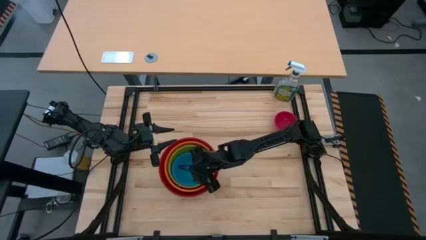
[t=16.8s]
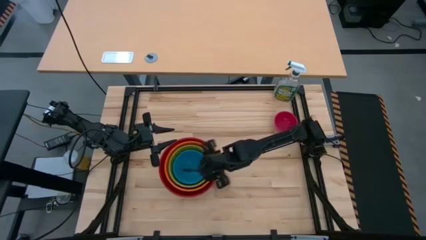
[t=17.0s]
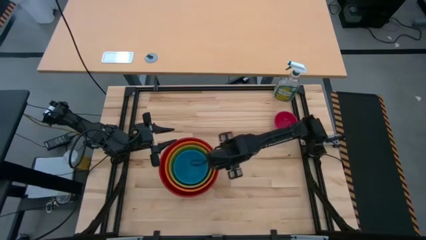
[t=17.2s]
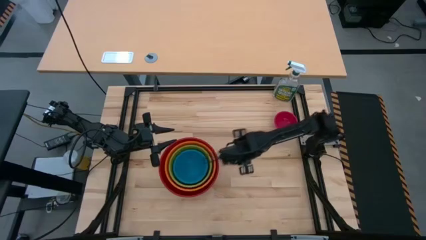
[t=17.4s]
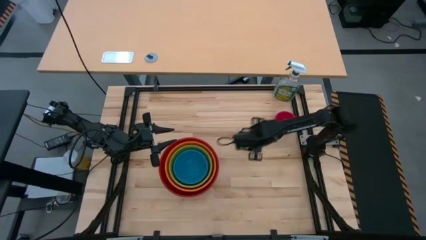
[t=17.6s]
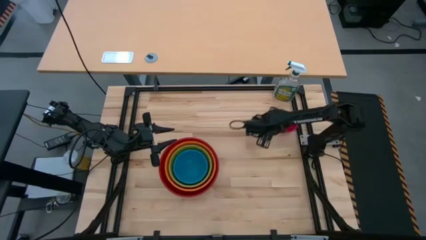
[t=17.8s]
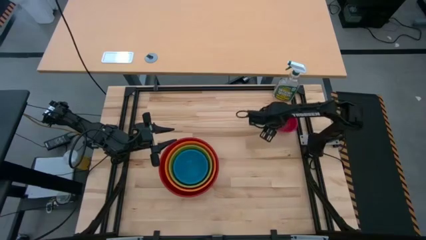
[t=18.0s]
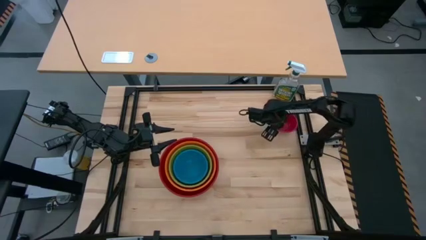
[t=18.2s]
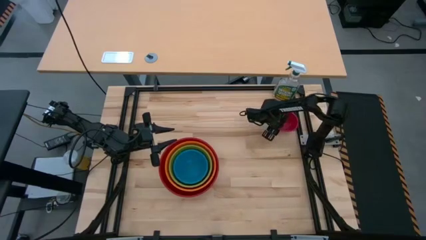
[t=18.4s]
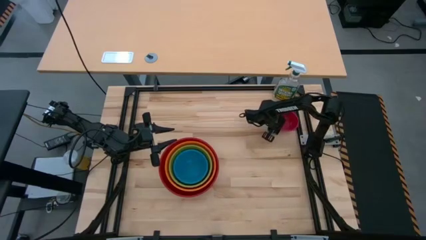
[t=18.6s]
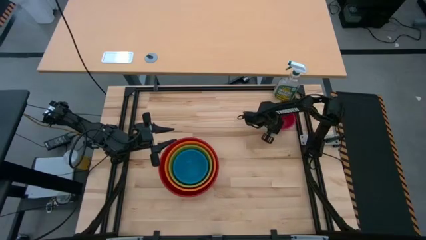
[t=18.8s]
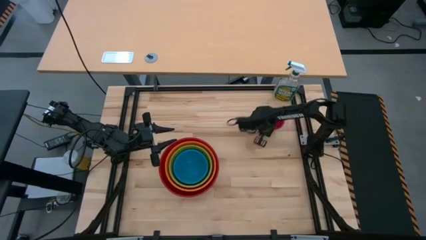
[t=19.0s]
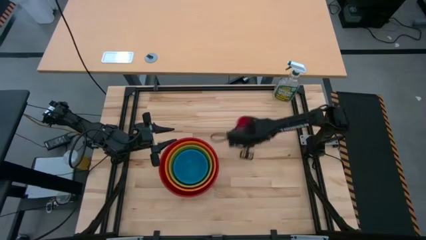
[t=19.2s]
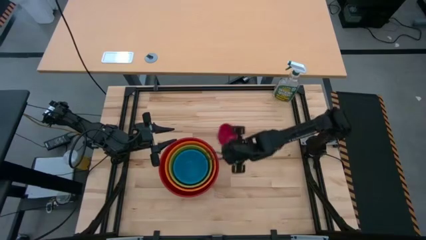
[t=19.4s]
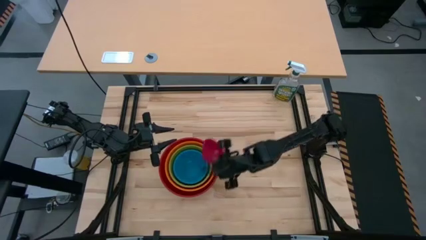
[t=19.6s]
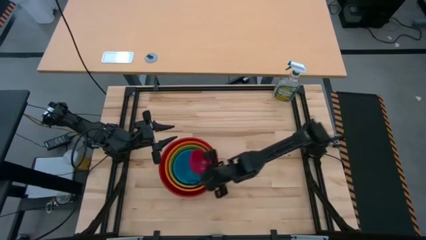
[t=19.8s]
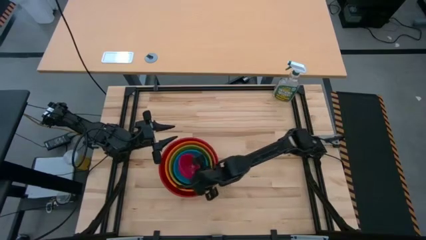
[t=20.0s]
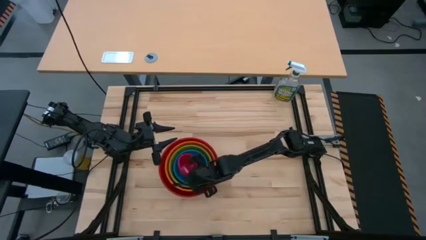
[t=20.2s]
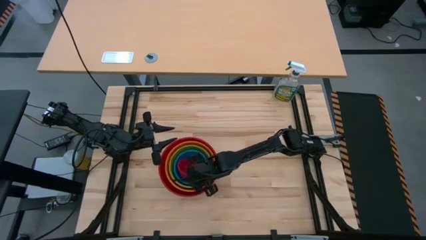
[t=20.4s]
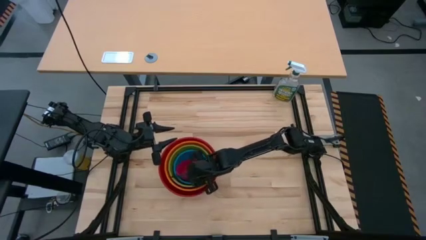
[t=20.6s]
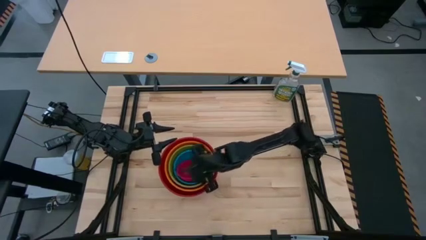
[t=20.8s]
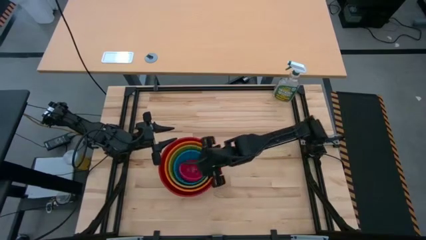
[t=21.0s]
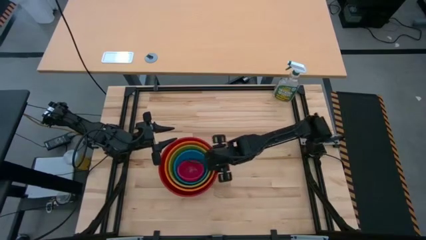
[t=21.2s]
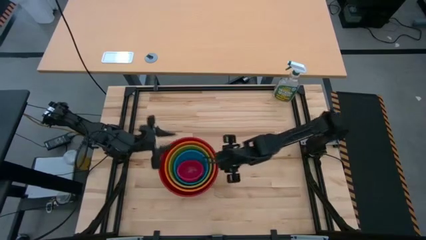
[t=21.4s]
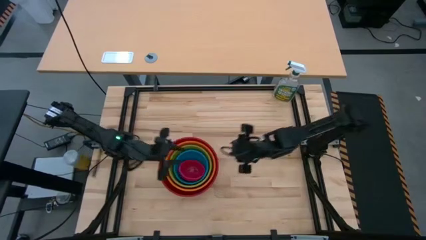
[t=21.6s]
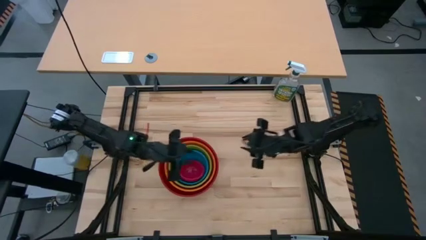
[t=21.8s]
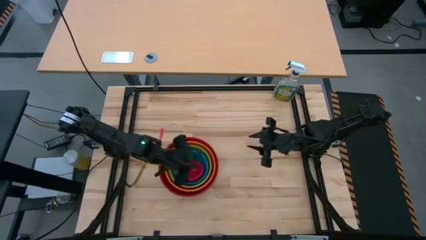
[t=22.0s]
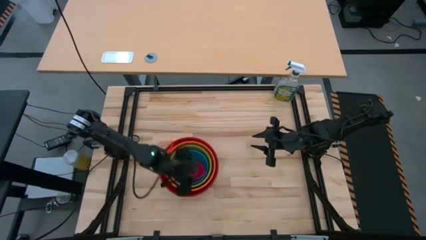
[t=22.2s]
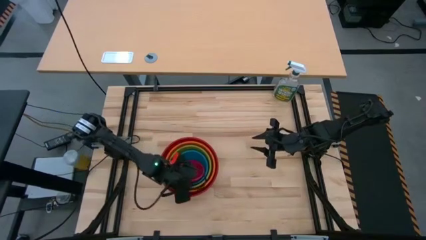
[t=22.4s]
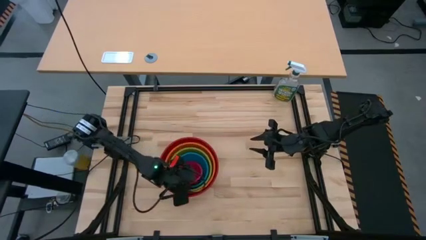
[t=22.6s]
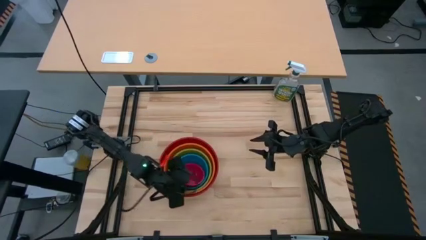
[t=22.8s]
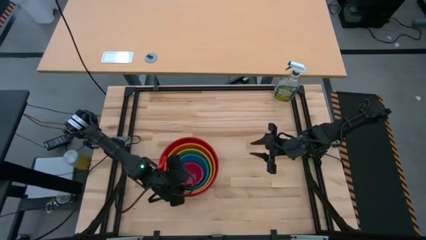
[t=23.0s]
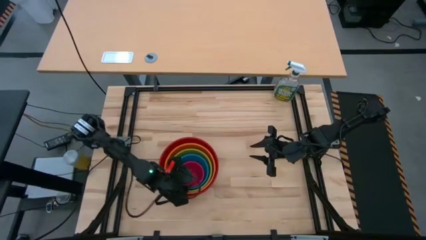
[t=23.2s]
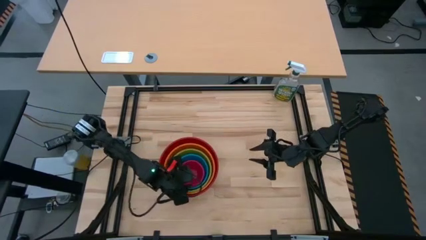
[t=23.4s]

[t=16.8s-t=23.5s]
Stack the small red bowl onto the blue bowl

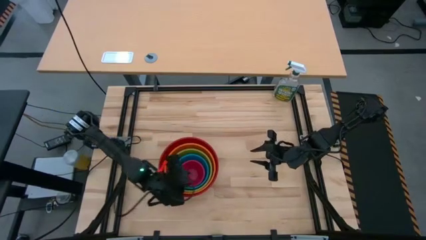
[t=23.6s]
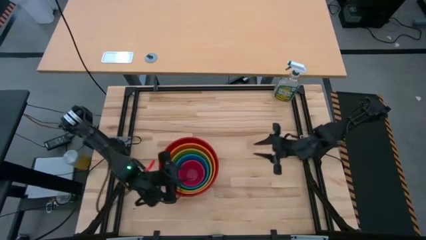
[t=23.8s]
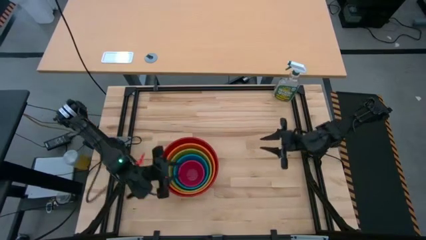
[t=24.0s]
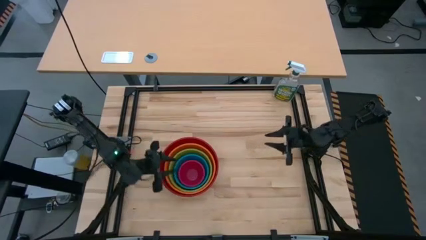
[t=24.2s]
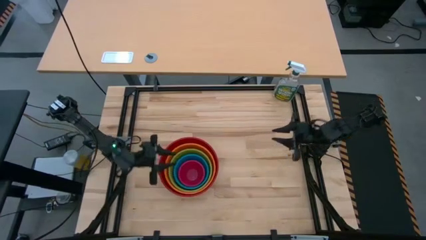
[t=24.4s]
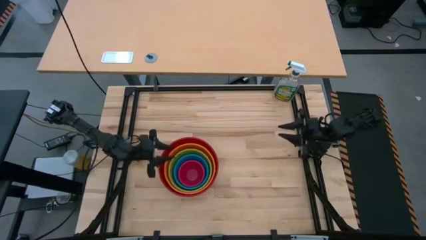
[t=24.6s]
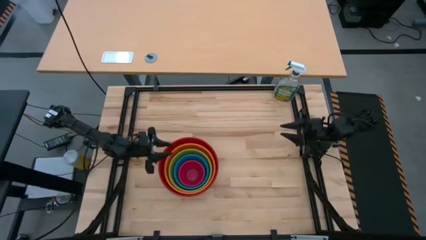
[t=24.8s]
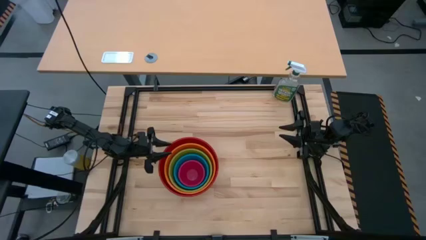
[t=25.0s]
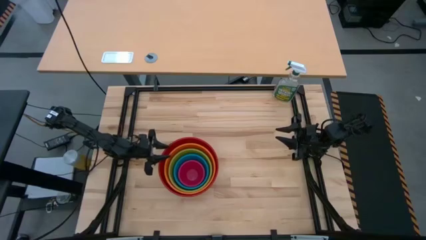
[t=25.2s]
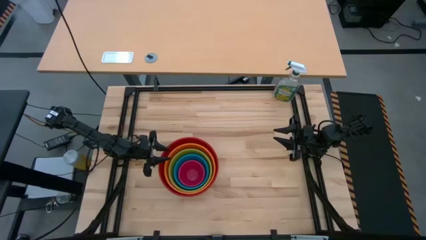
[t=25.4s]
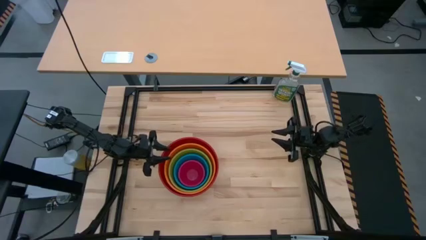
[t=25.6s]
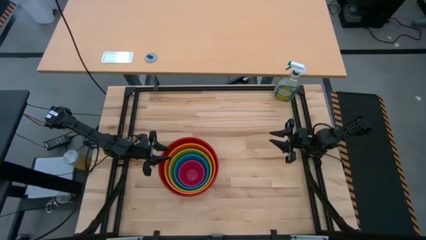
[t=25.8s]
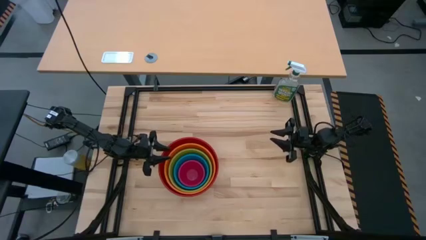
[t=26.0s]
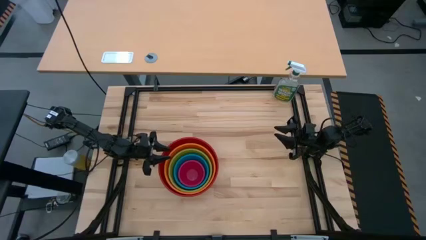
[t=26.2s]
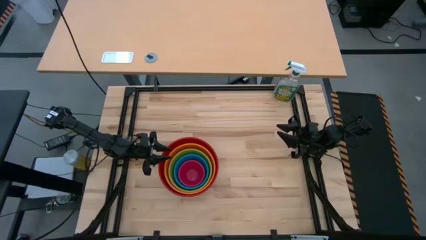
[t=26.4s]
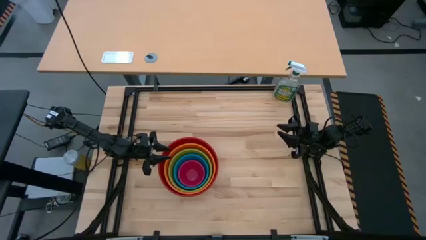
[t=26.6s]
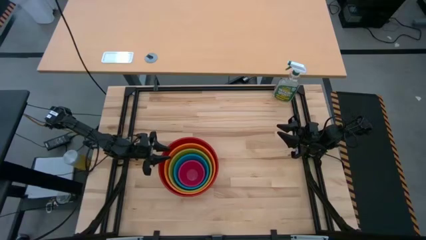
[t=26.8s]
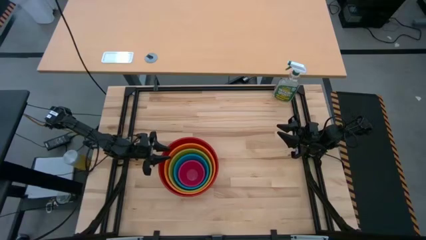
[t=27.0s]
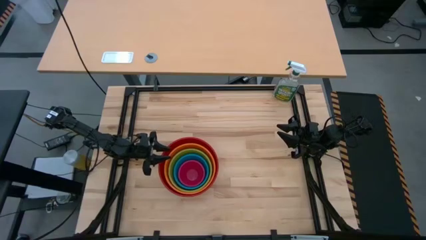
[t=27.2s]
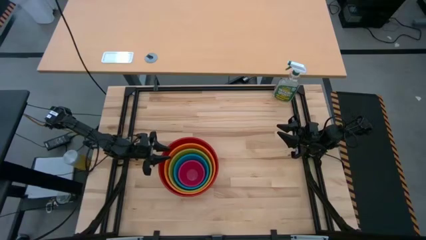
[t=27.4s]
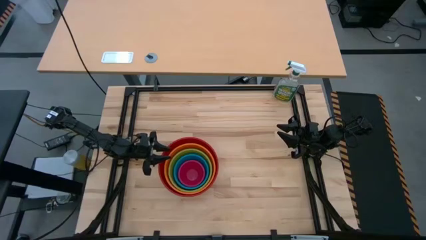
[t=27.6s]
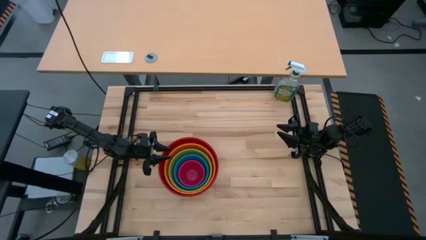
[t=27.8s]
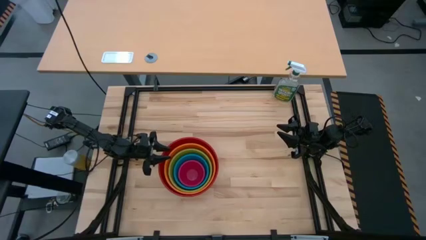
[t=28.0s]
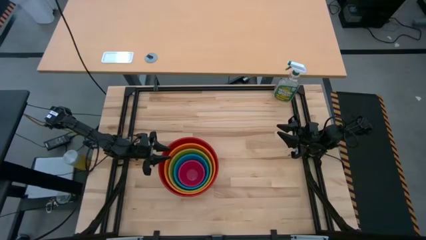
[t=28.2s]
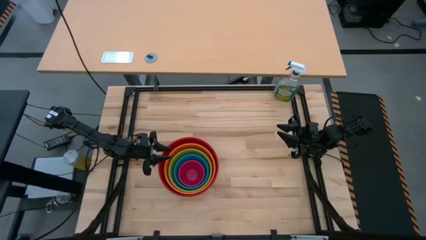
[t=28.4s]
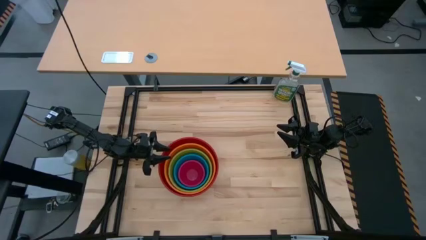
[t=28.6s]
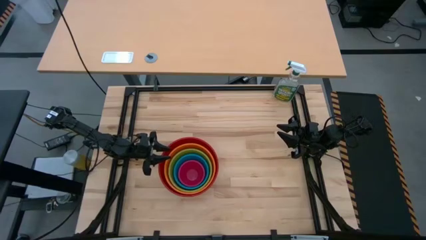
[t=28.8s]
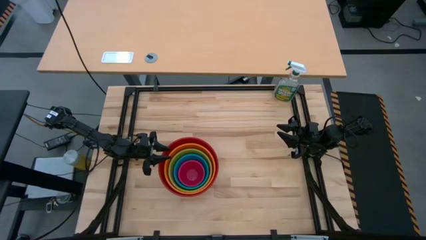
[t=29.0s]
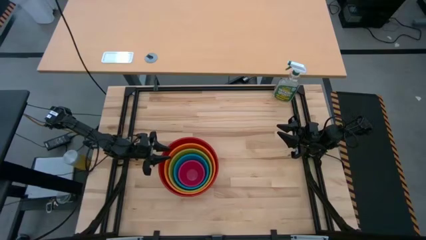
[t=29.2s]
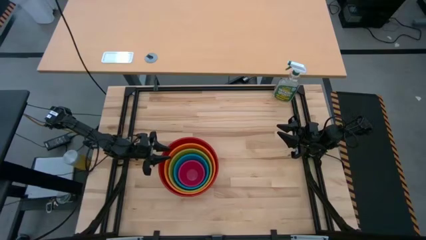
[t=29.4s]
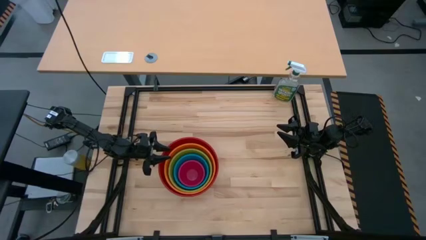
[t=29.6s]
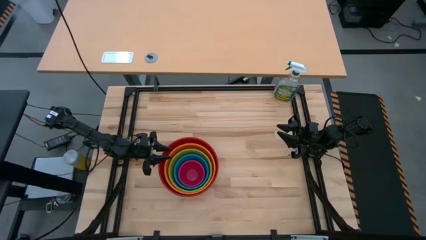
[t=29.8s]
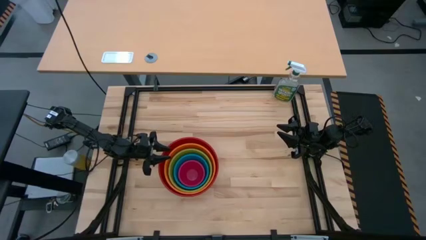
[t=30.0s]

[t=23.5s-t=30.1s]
Return to Home Position
